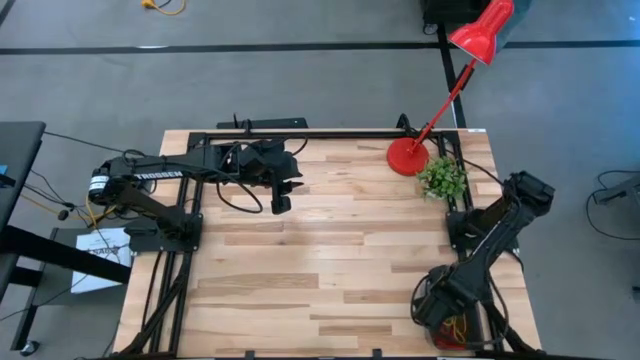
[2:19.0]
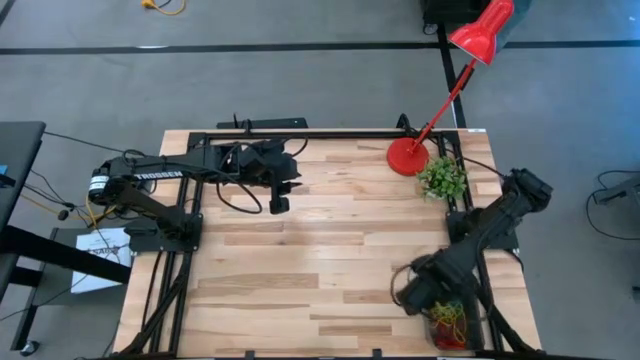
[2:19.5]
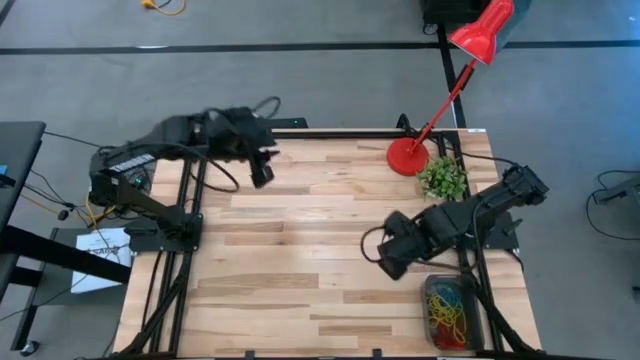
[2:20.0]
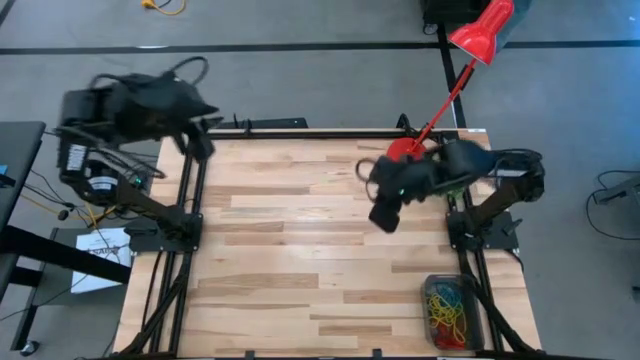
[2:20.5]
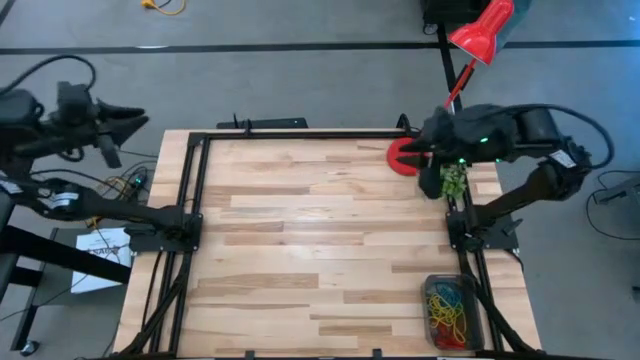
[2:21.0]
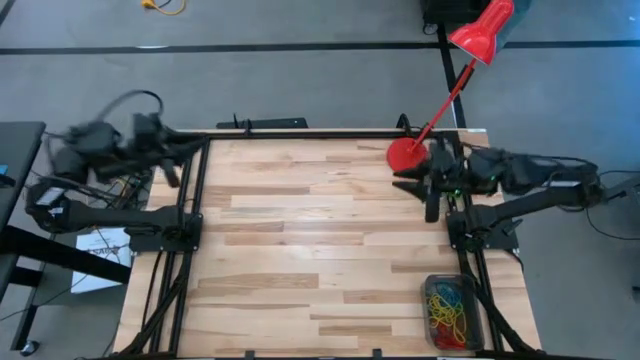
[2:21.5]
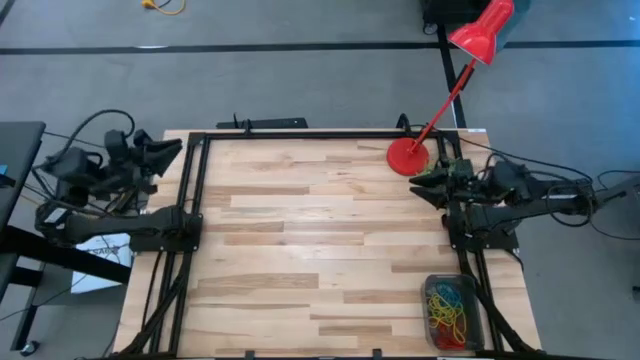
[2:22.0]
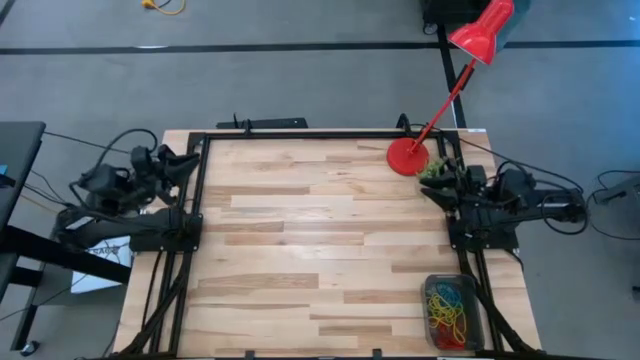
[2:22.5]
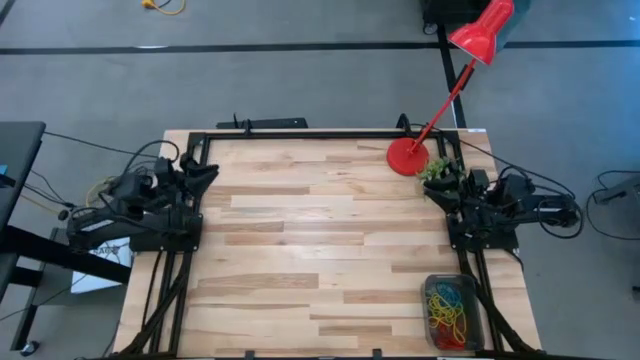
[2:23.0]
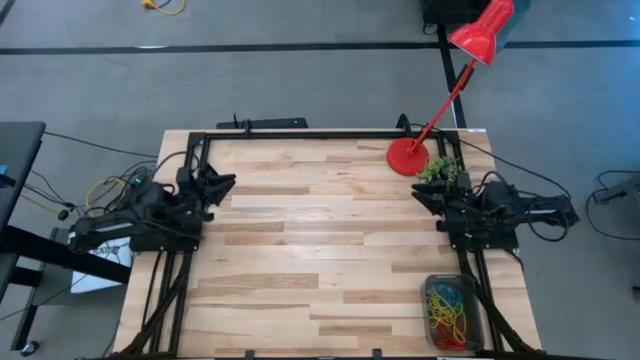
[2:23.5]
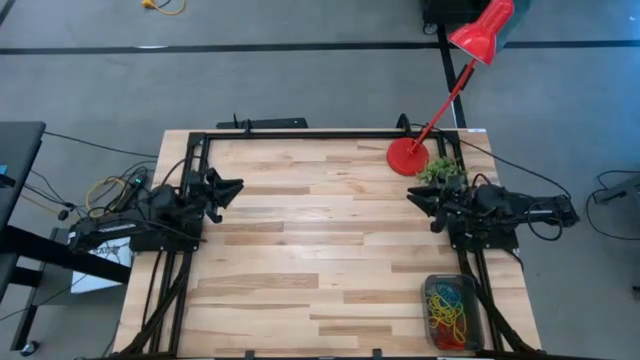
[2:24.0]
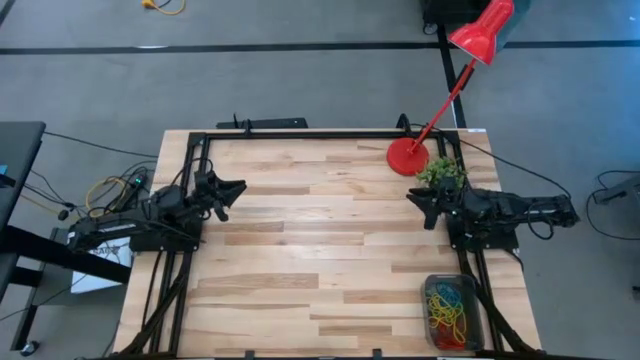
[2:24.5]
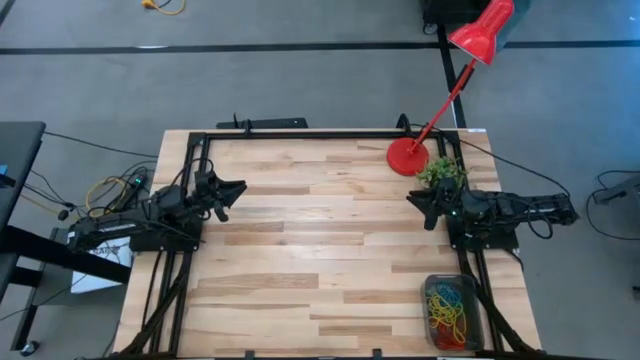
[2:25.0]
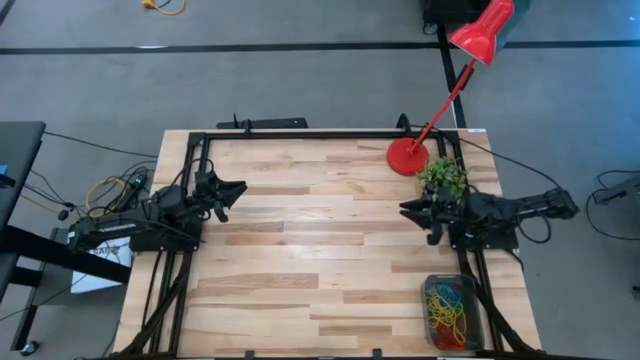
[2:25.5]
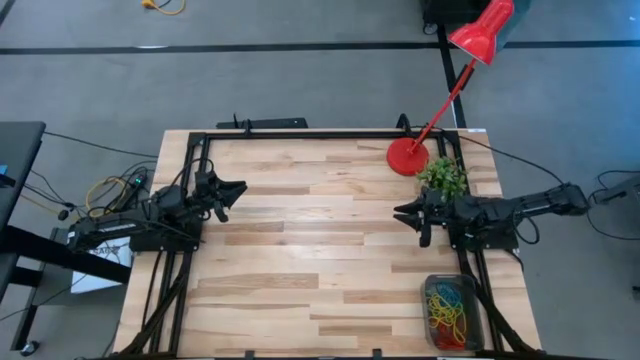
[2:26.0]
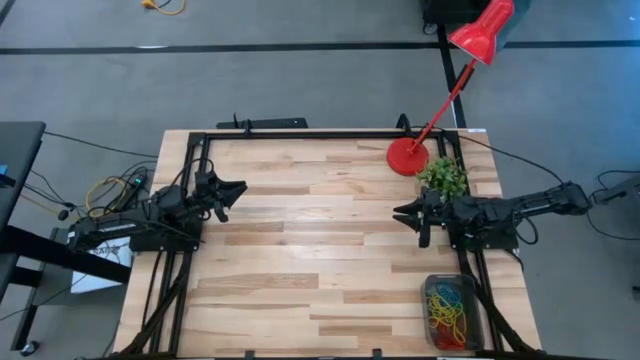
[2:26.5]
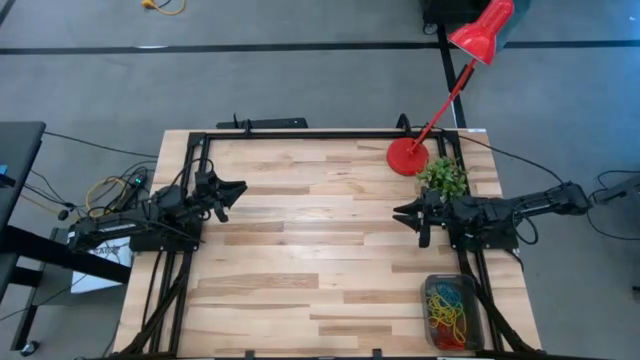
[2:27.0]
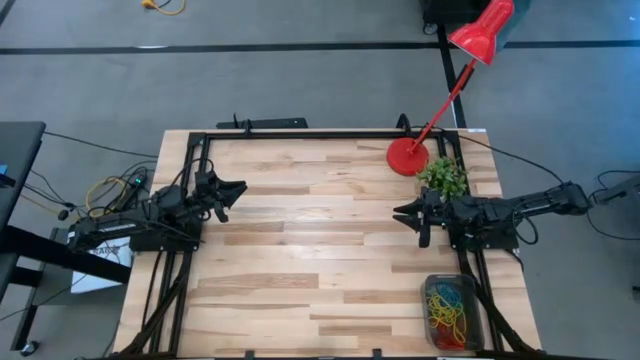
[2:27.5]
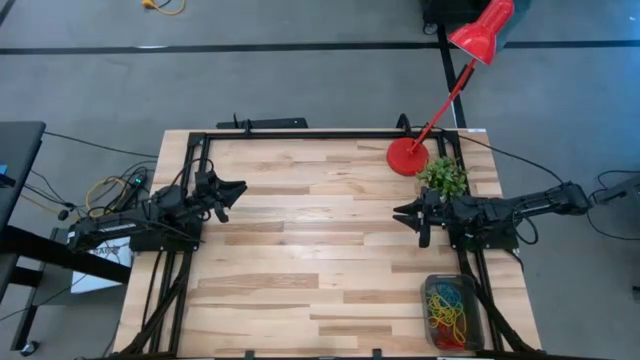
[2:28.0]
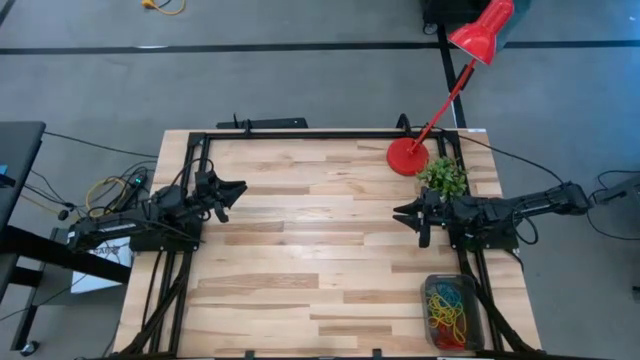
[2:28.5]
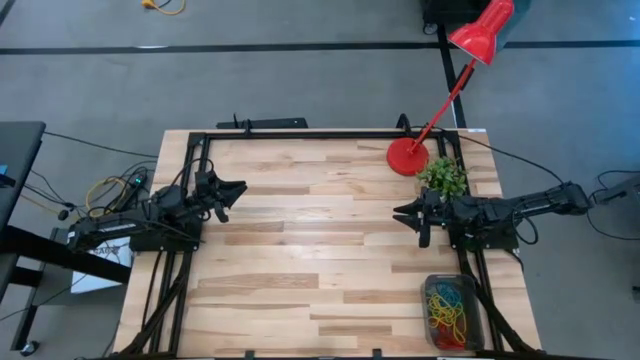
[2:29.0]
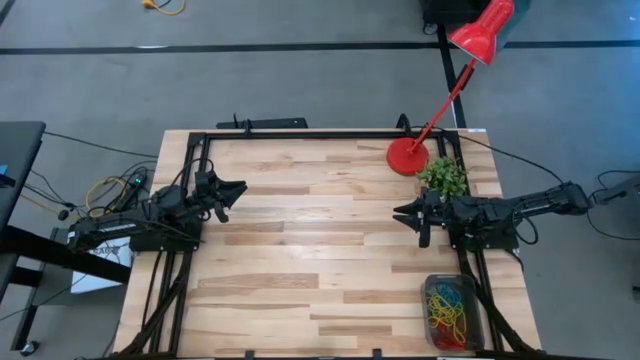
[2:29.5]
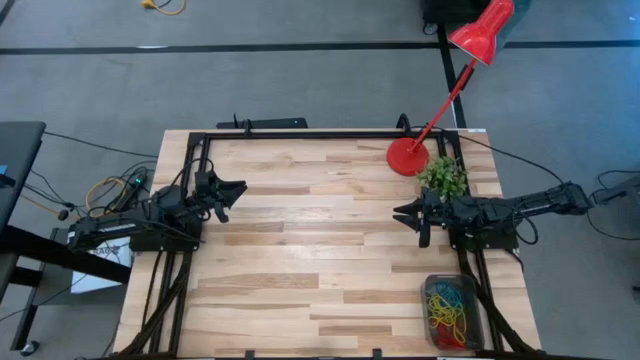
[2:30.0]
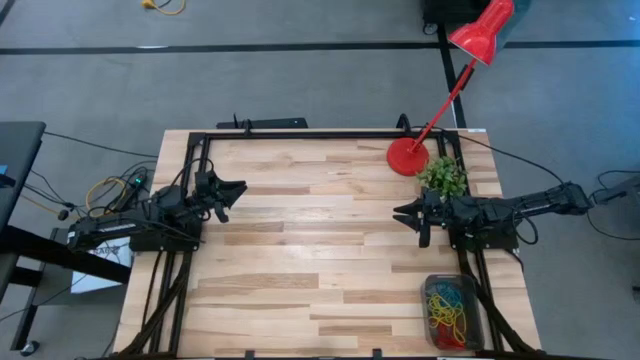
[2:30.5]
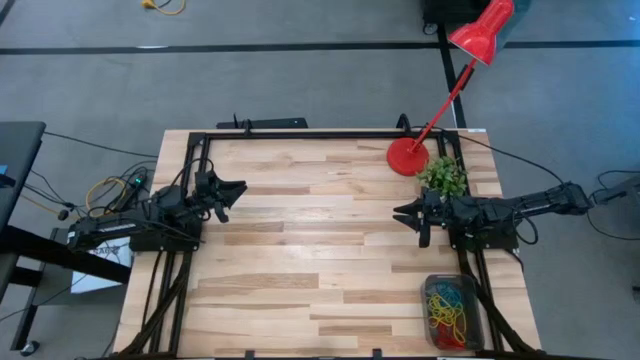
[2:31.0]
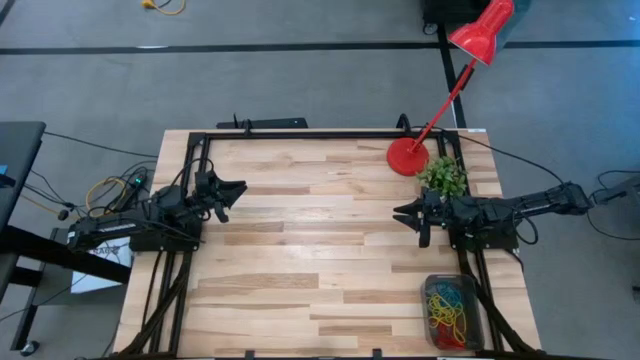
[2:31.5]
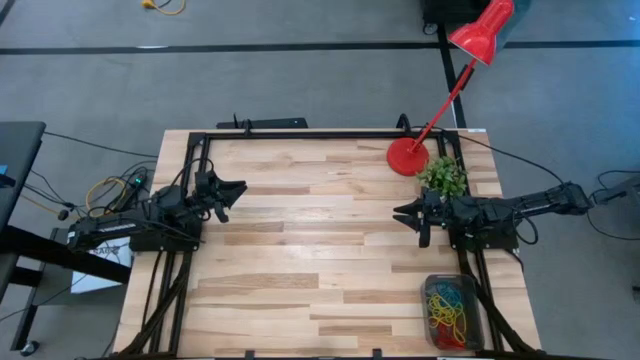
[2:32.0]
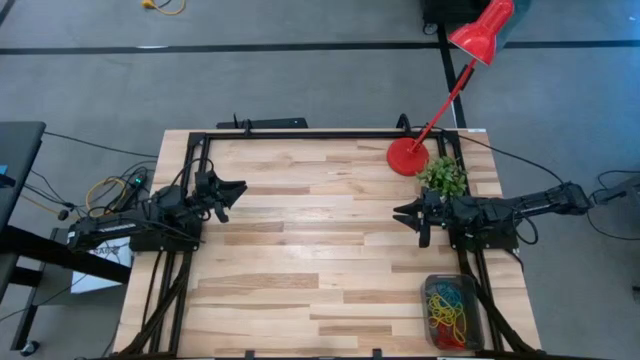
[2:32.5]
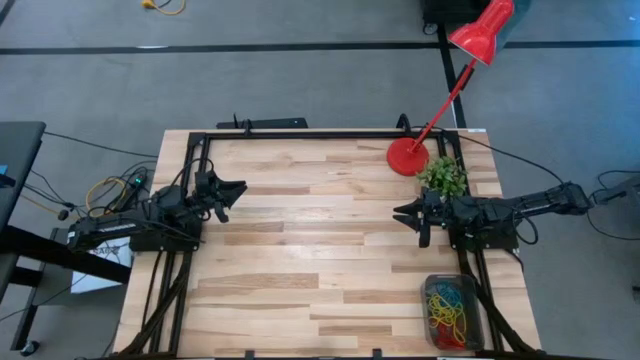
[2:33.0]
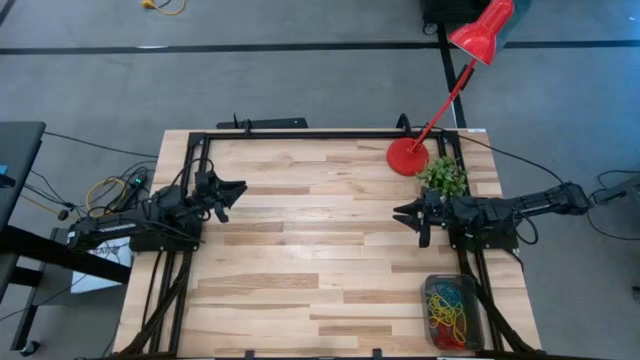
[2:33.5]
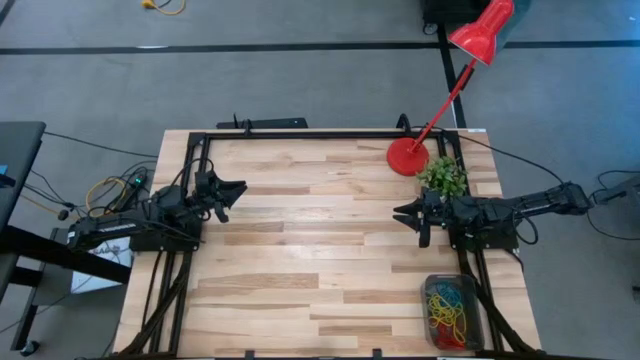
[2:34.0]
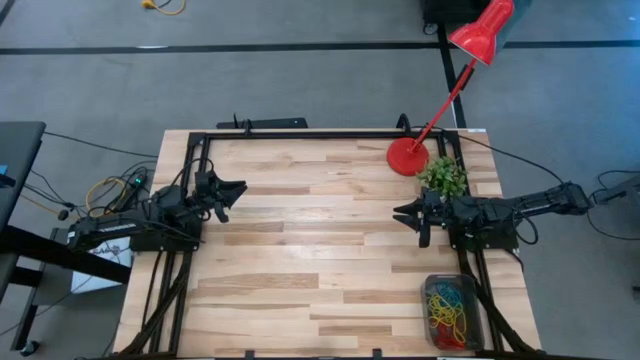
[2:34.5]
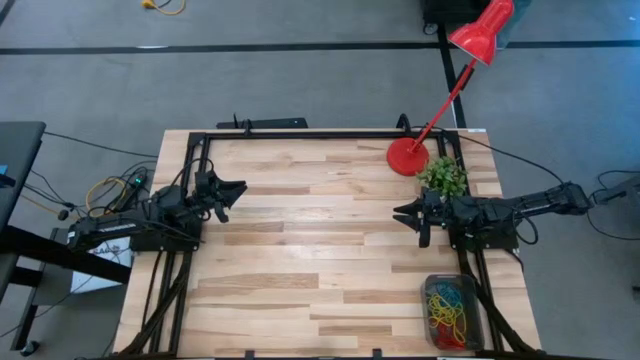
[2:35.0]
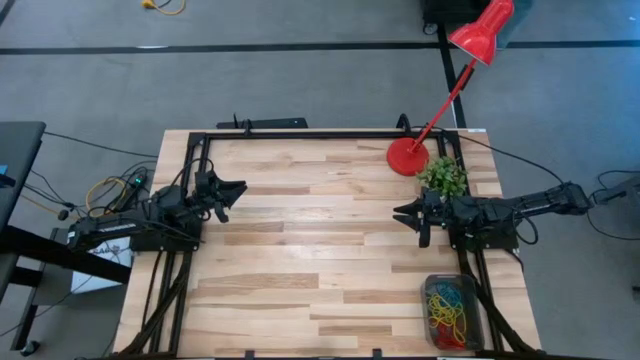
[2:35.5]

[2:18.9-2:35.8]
Task: Pick and place items into bin
Return to Home Position

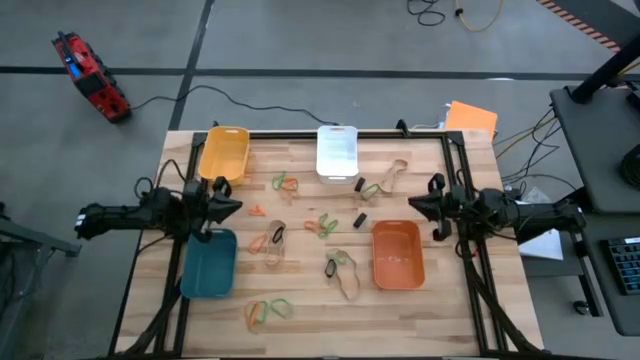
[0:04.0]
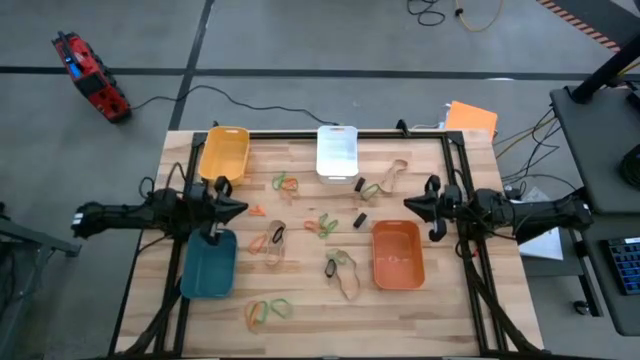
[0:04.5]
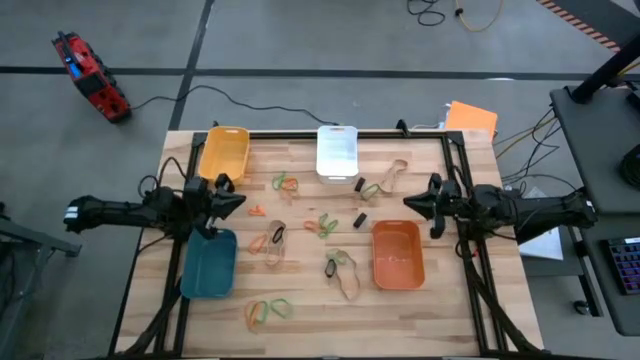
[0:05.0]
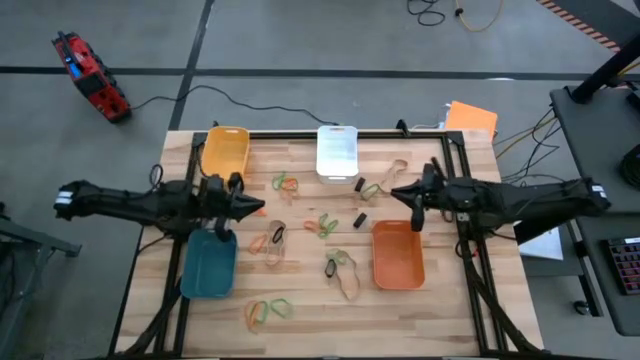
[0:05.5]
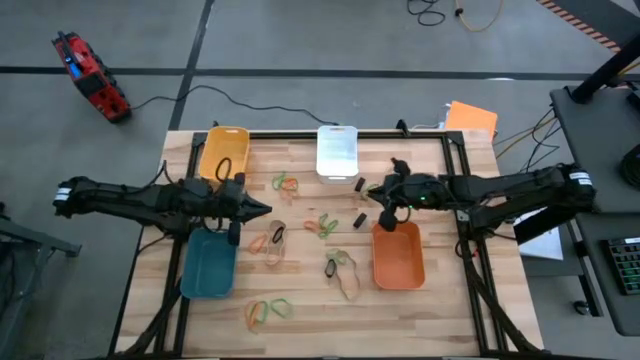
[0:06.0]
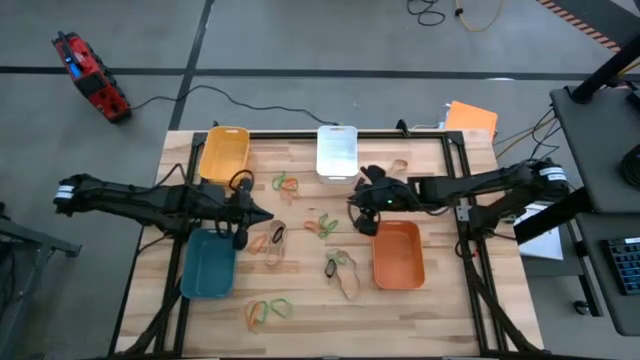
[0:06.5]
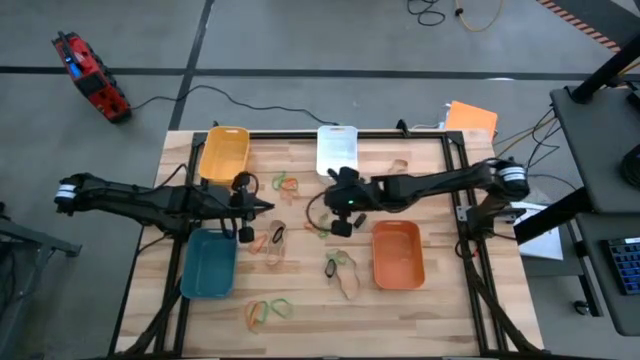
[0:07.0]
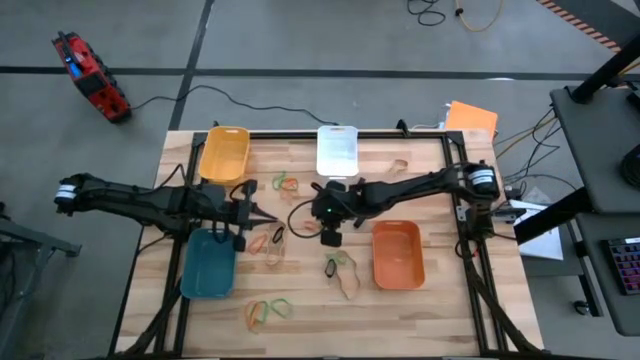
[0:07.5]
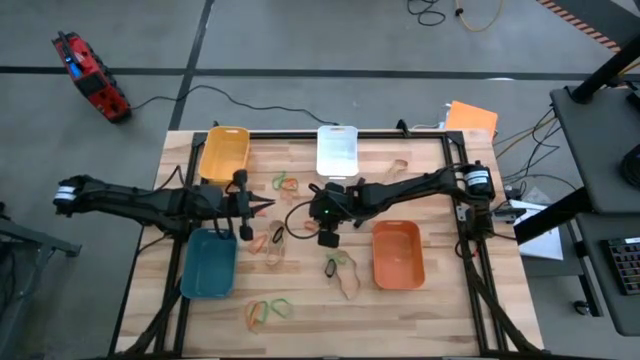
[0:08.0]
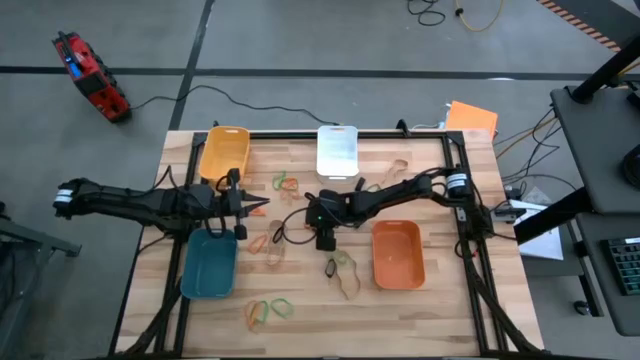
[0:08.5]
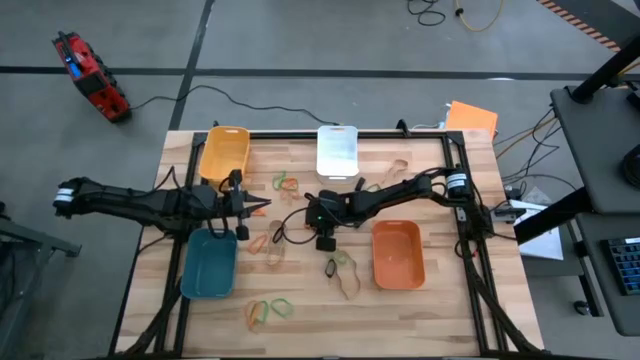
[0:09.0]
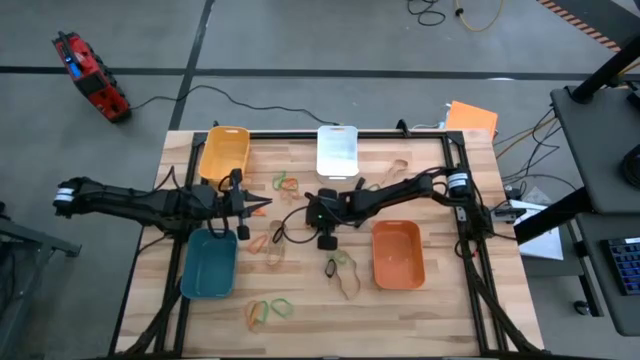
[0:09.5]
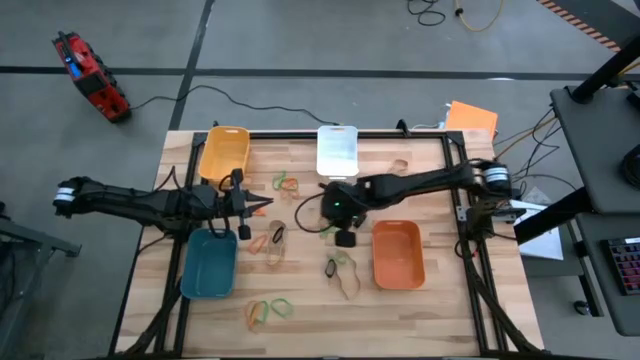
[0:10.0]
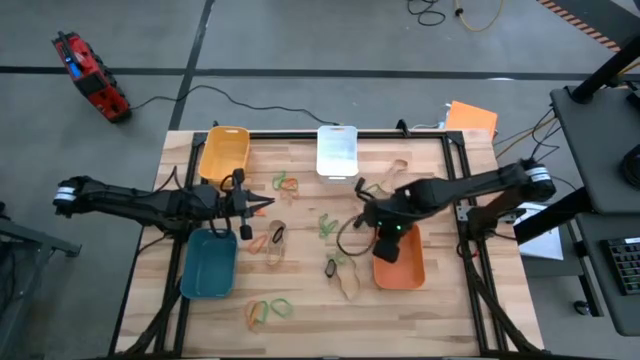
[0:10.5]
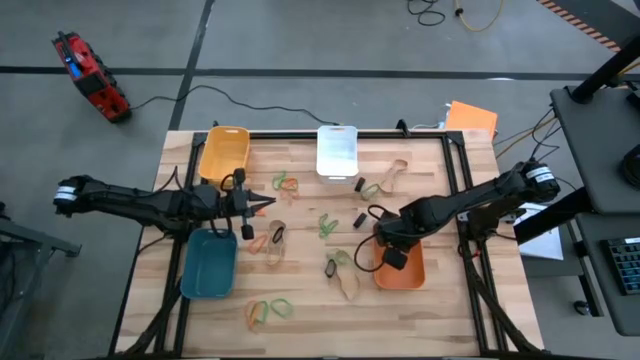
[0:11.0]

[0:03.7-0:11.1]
Task: Sort rubber bands into baskets
Put the orange rubber band into the orange bin
